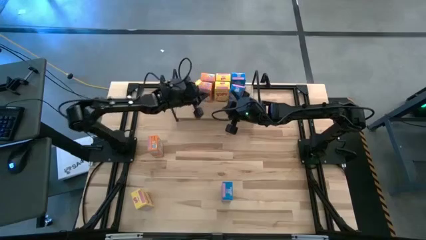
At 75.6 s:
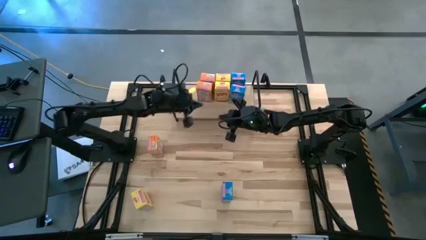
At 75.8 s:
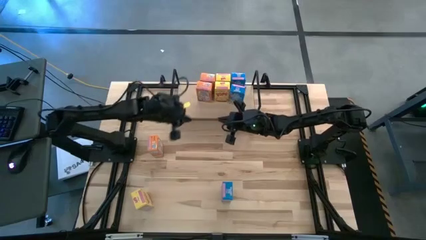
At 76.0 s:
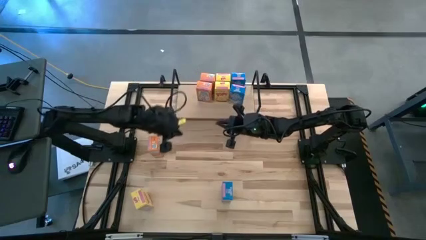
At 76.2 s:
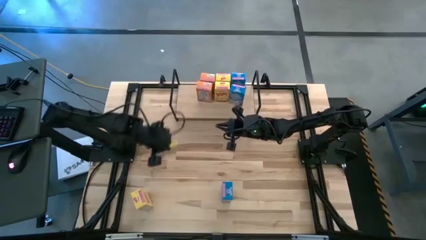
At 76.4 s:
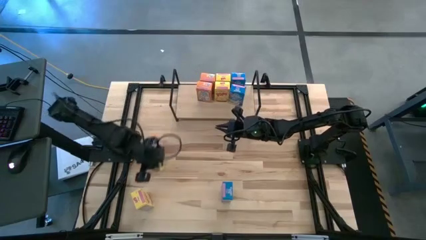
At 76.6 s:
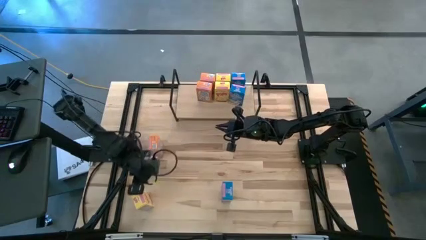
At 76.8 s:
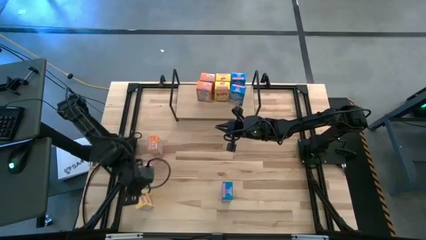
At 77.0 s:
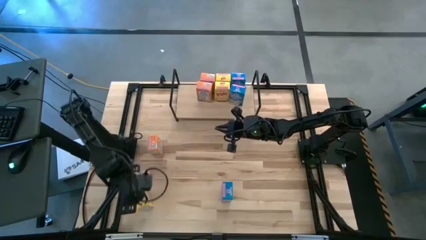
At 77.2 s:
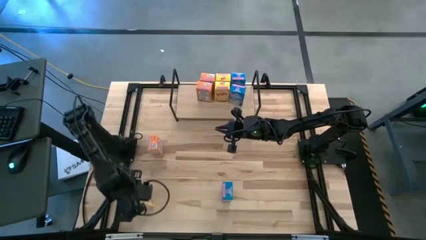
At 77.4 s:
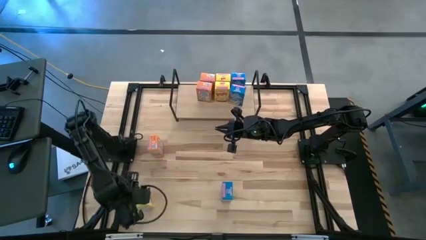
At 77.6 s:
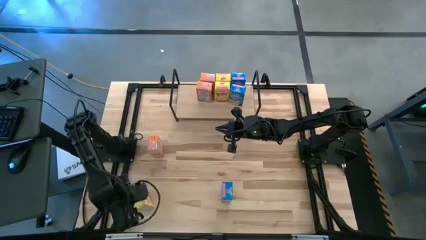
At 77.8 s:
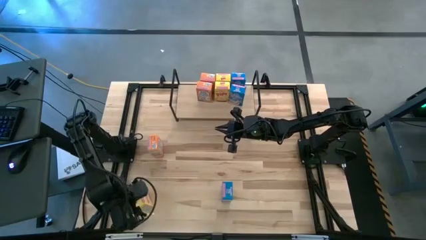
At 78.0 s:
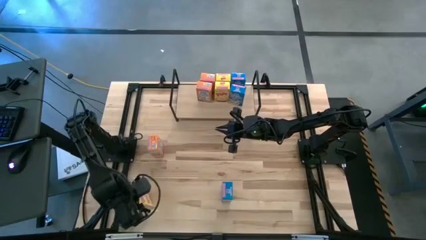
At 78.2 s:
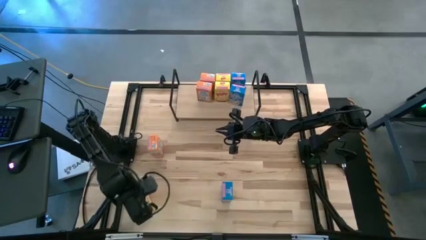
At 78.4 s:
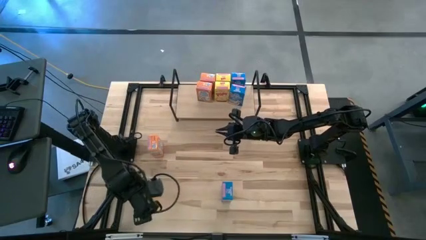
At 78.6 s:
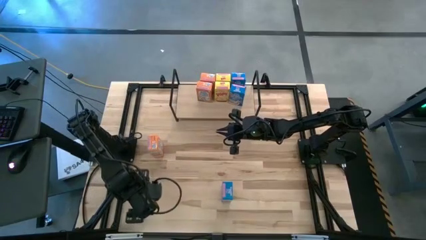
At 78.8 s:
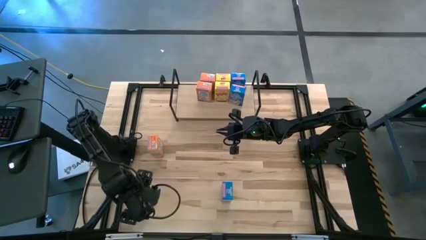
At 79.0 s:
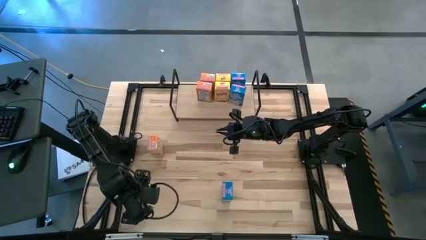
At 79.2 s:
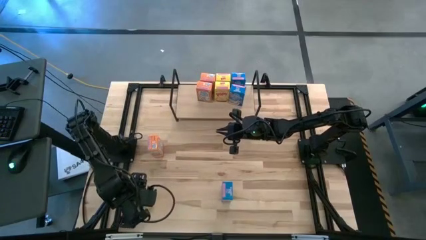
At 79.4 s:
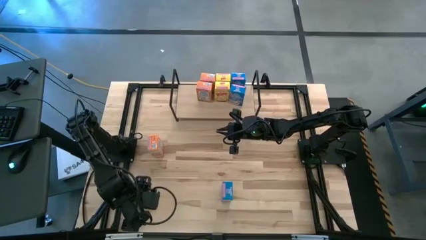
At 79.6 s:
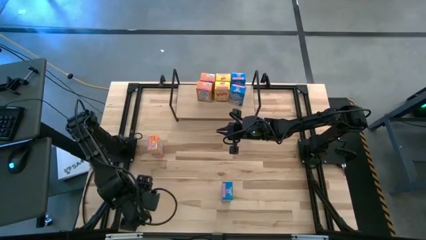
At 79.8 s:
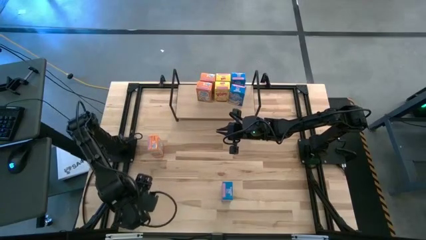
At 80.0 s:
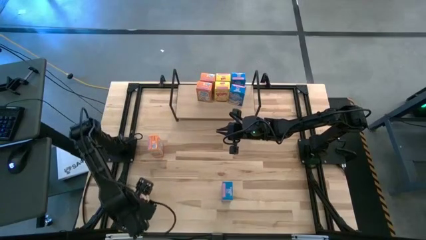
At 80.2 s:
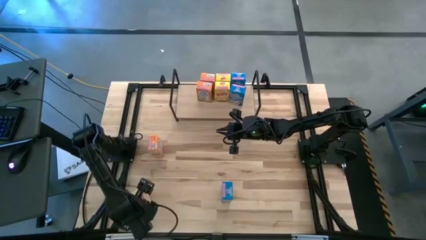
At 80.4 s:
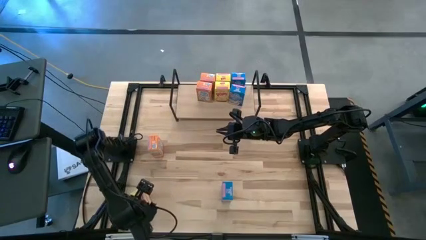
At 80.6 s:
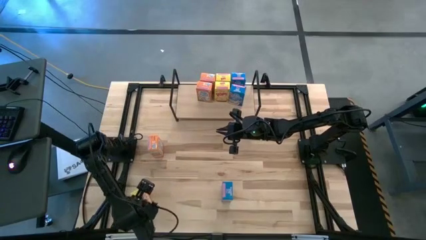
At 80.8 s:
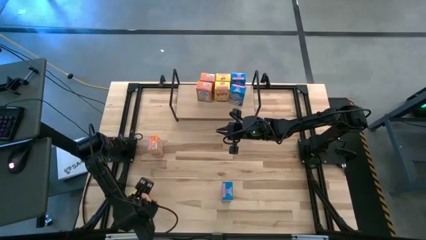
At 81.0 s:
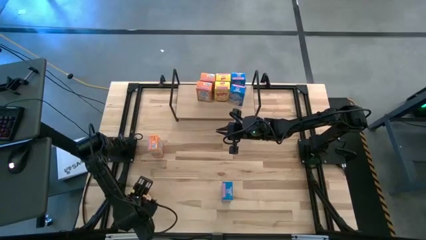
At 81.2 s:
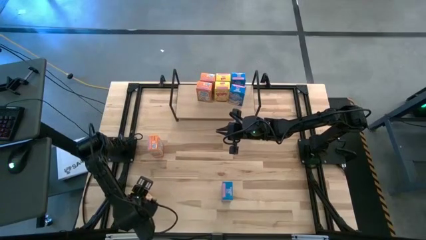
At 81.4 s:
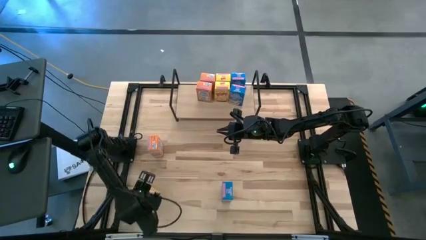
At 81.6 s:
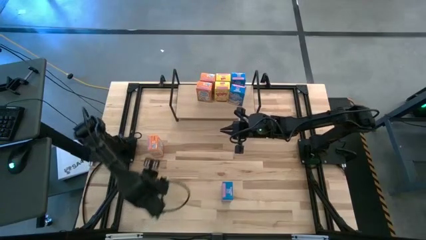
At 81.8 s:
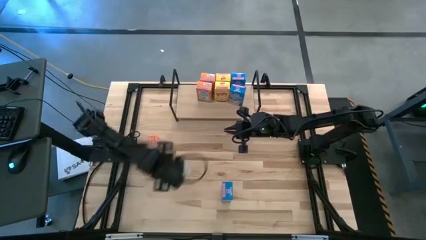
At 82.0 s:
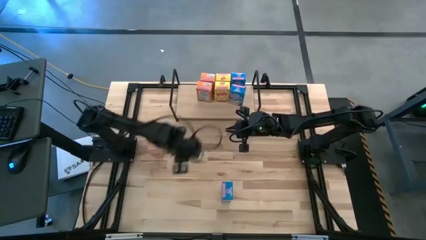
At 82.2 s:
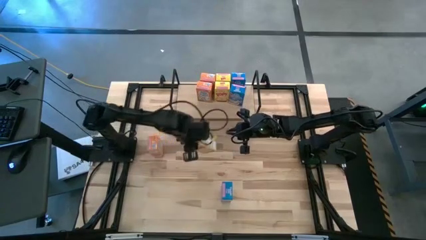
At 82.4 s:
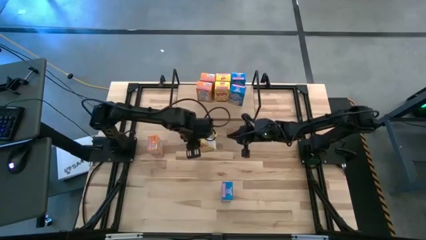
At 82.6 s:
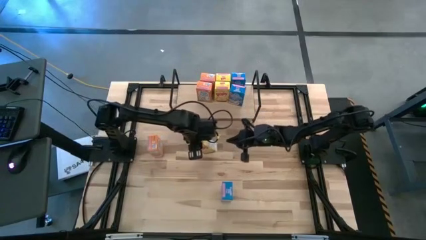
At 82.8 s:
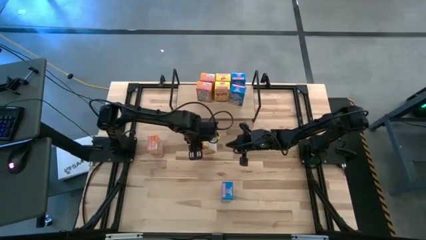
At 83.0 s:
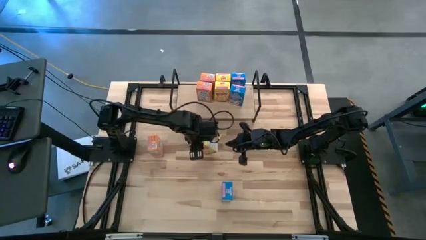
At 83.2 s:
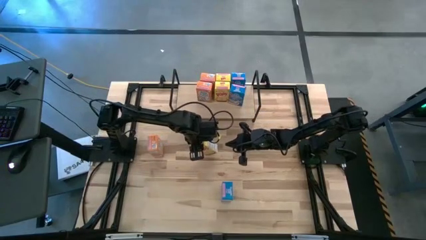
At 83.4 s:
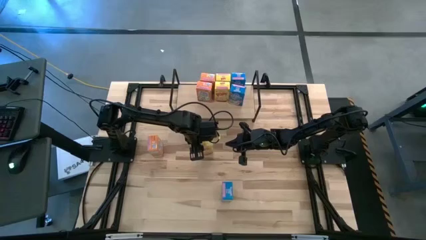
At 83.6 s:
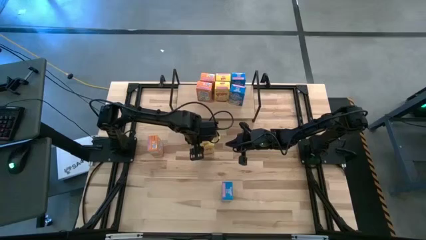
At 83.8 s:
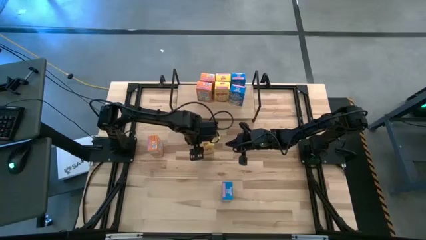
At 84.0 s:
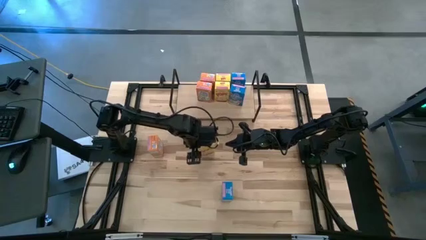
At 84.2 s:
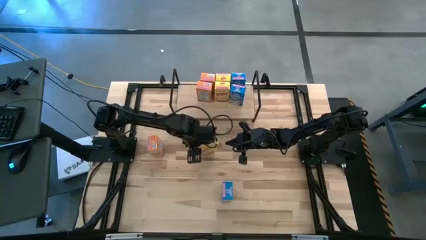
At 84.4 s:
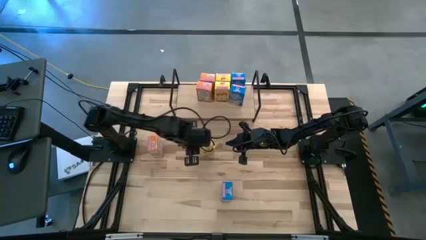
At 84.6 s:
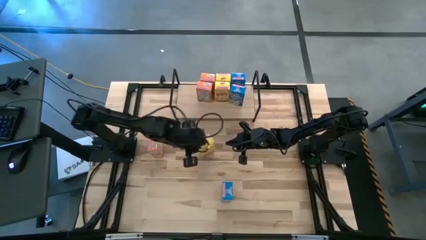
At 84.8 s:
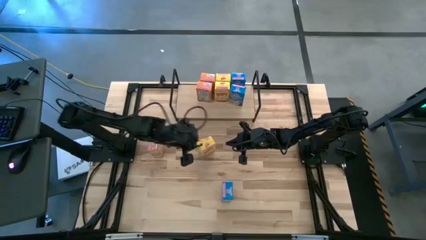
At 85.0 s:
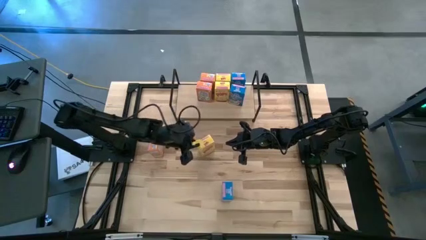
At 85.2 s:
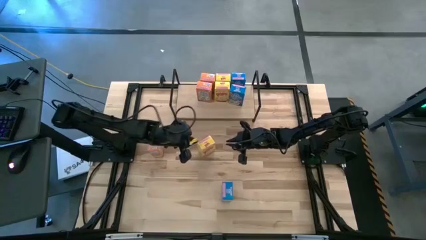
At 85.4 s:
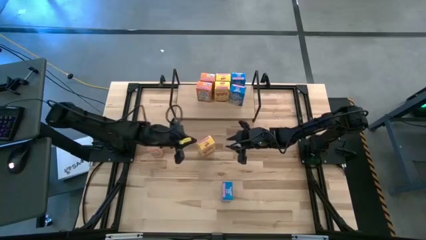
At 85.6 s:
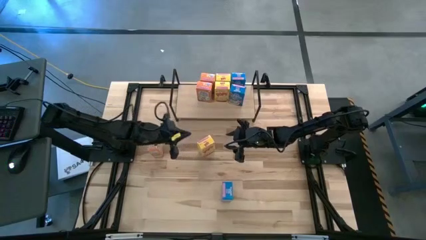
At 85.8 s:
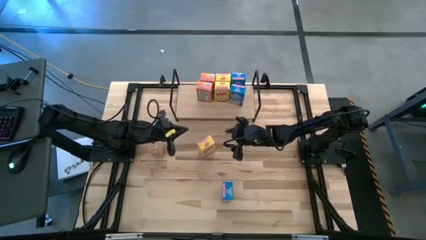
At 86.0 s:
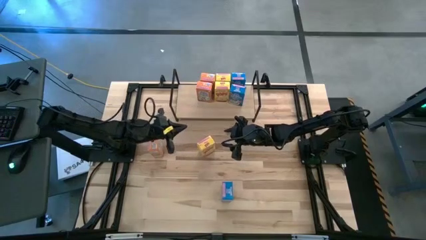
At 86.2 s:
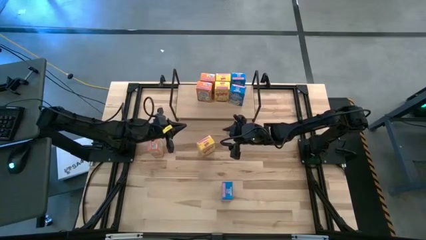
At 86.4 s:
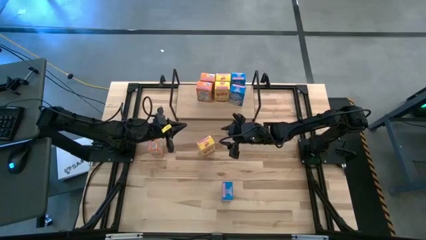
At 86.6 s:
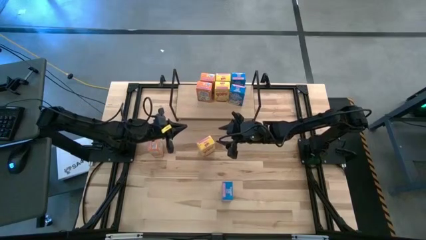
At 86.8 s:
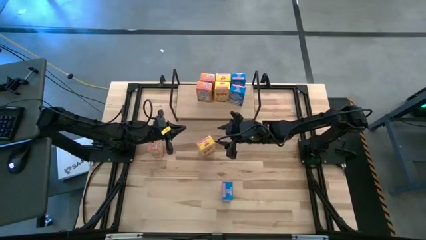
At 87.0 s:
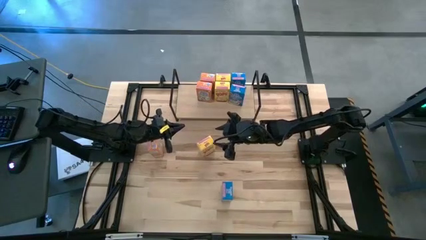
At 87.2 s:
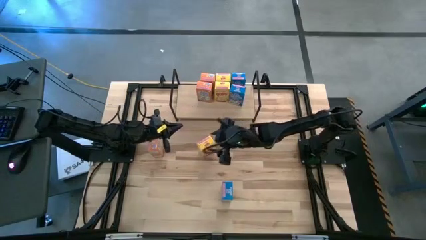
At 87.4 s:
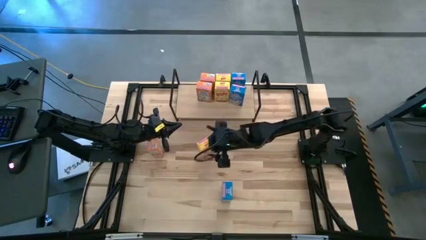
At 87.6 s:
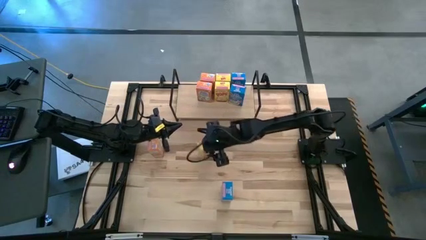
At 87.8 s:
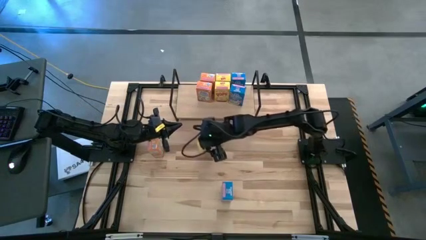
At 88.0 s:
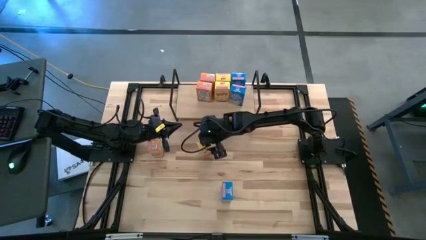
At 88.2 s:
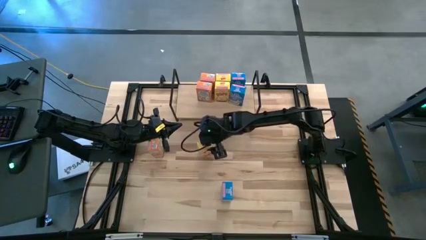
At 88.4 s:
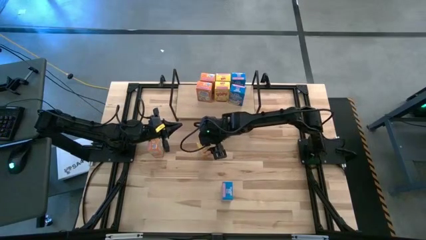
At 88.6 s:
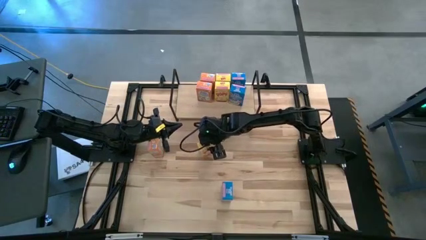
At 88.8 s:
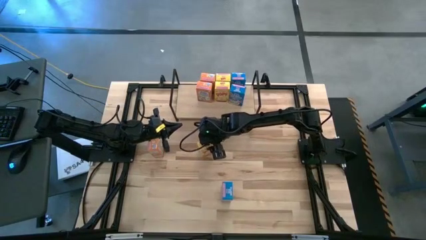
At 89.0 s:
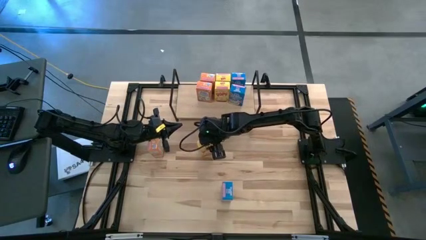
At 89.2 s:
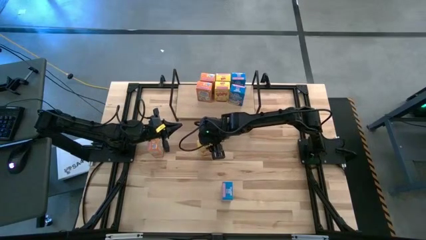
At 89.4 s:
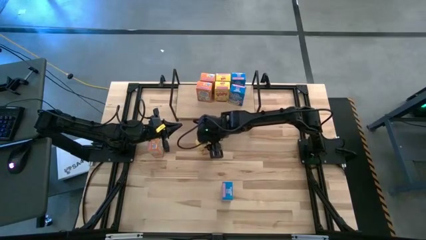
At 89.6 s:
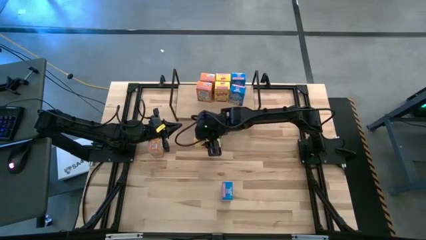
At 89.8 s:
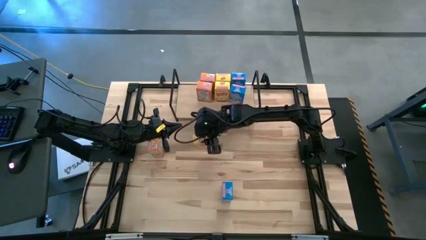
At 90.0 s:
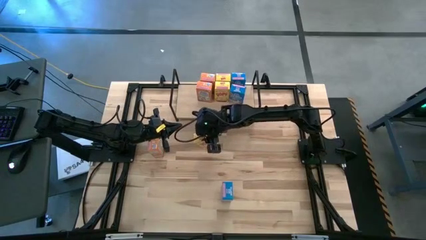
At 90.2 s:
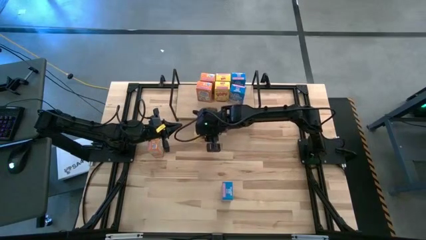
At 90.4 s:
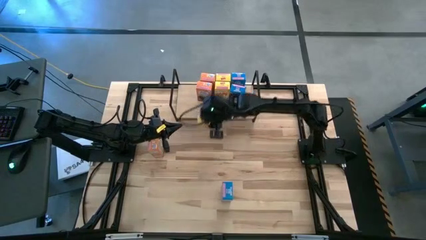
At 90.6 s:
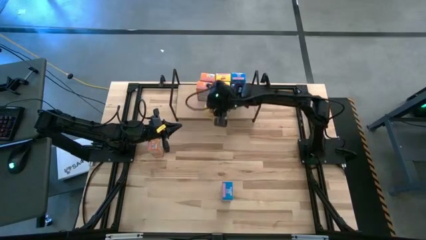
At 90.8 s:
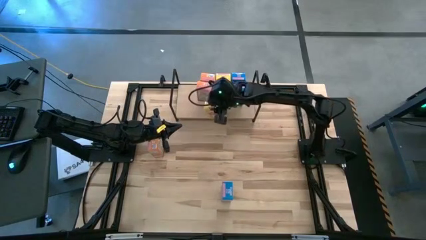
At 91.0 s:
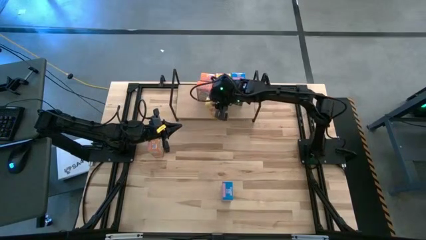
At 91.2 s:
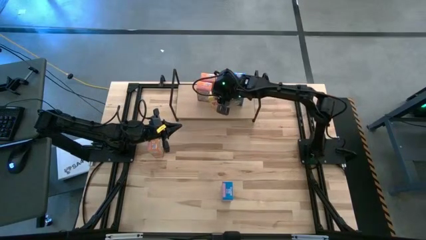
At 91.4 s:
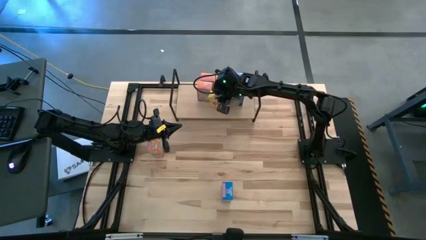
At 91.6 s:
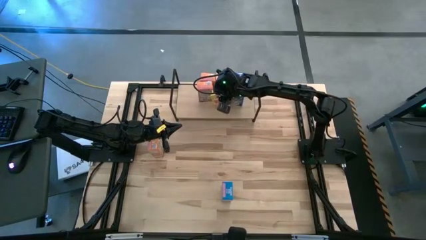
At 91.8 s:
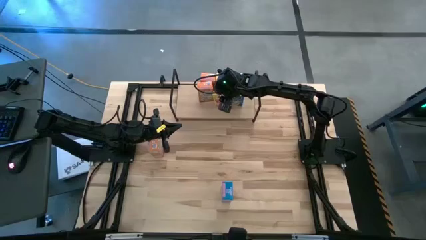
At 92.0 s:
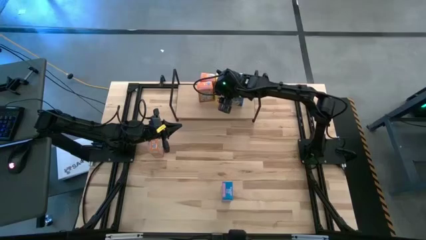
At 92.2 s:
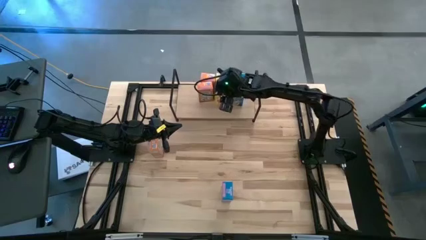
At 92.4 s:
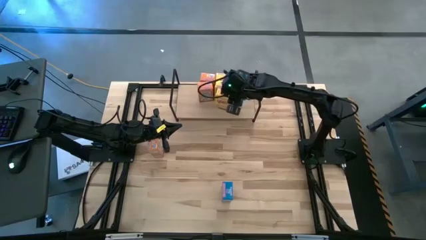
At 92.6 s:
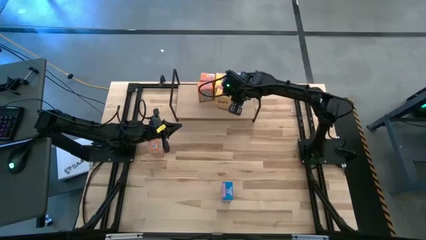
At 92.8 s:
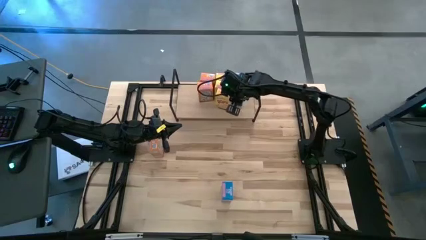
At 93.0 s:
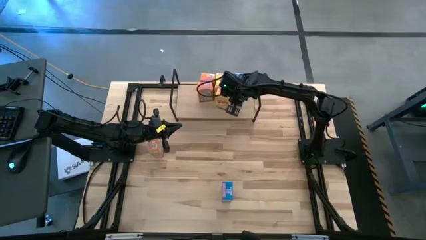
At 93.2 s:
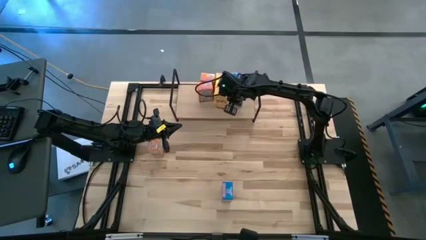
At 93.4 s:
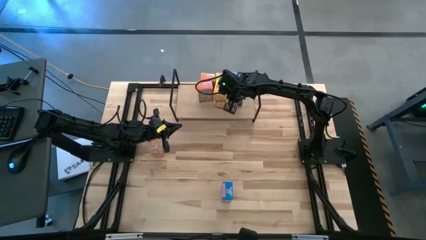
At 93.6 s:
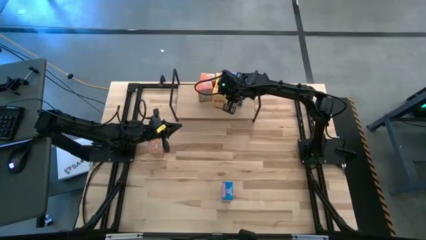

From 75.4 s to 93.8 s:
Task: Stack cereal on shelf
Put the yellow cereal box aligned with the other yellow cereal boxes on the shelf
